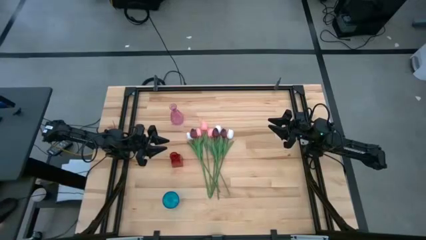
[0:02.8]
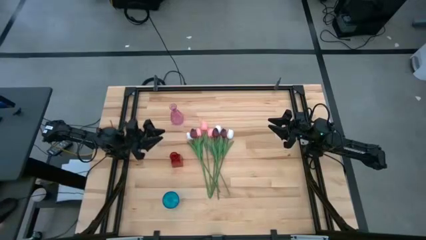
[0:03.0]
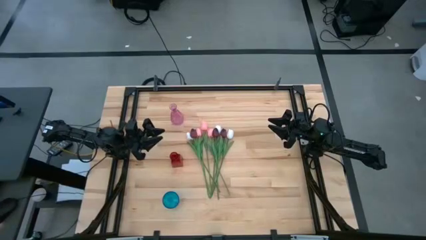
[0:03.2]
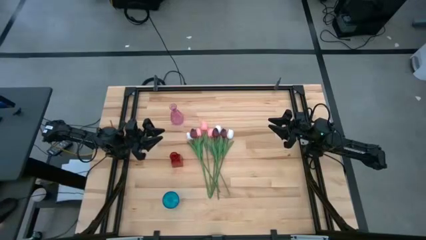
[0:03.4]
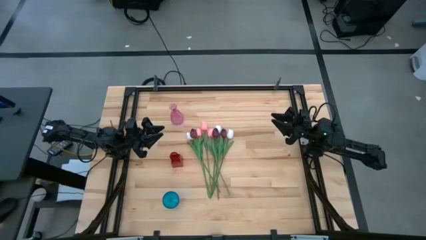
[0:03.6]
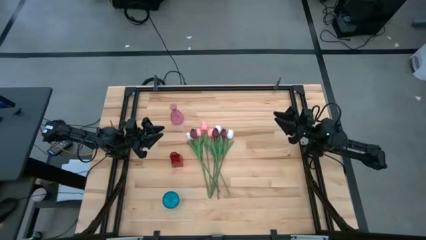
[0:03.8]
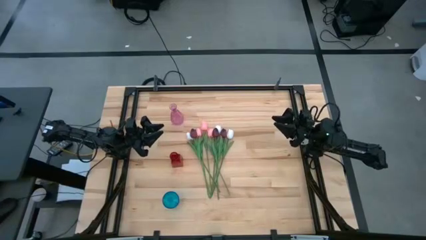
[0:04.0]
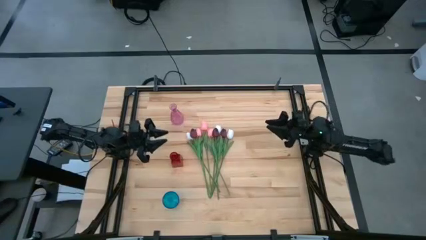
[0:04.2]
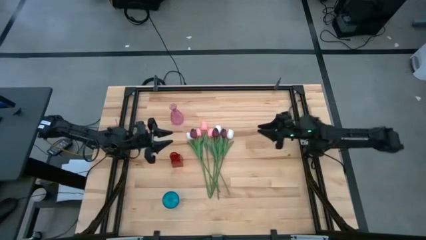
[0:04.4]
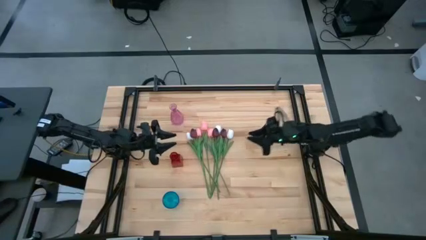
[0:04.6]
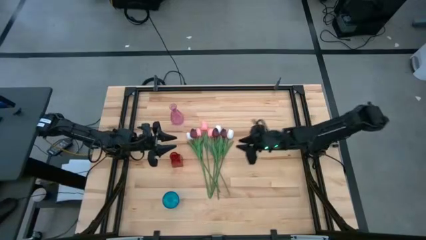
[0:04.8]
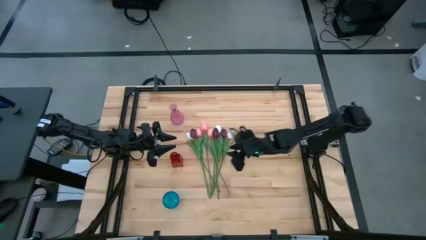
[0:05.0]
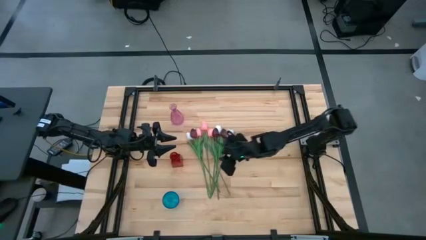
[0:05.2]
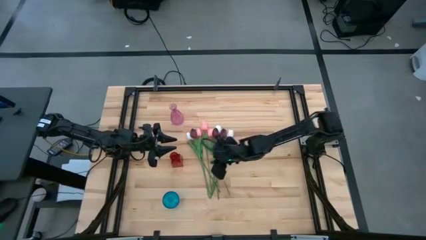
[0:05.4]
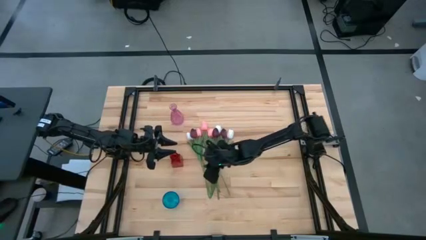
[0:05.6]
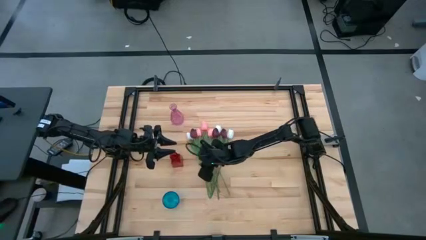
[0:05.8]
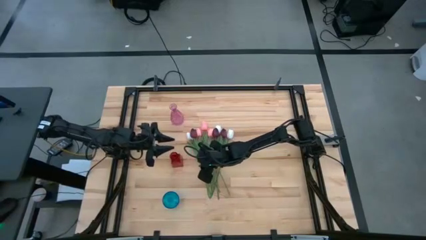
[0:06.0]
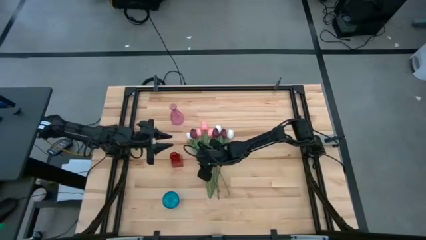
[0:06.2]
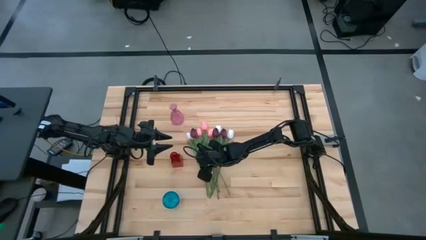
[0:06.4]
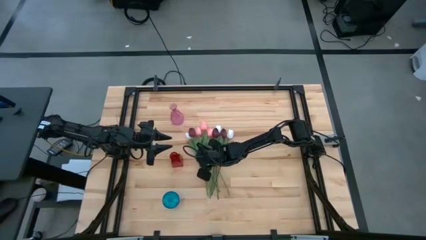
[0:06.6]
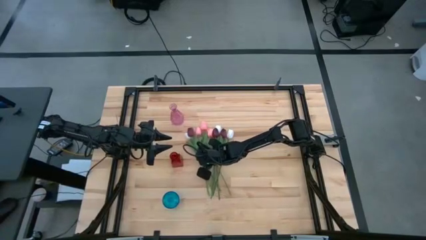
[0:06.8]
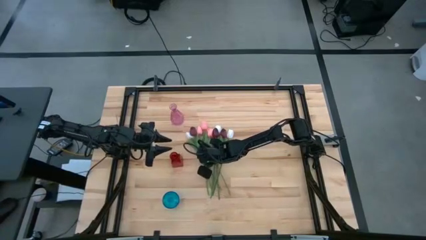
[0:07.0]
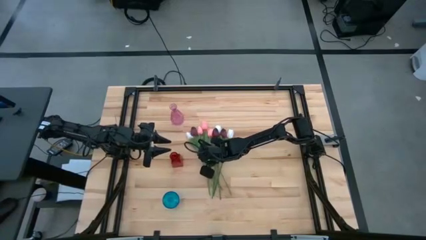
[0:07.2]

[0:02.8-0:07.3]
Task: Sort flowers into vase by color
Put the left red flower into the pink vase

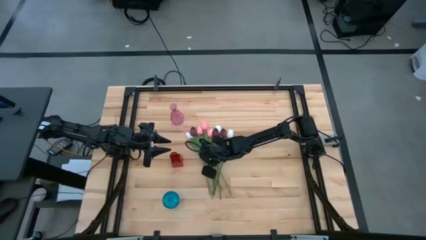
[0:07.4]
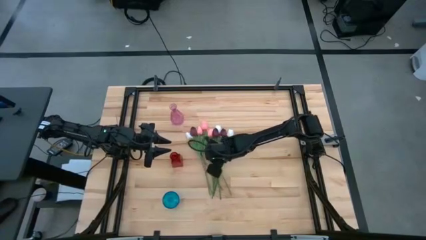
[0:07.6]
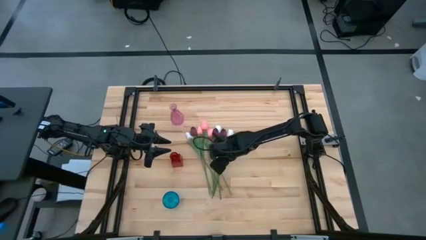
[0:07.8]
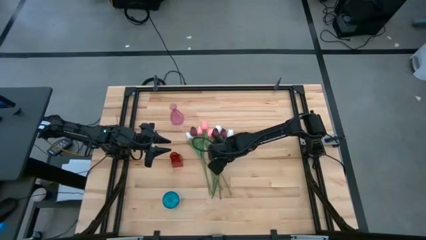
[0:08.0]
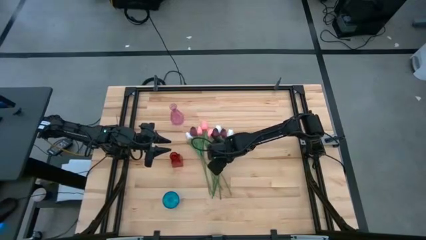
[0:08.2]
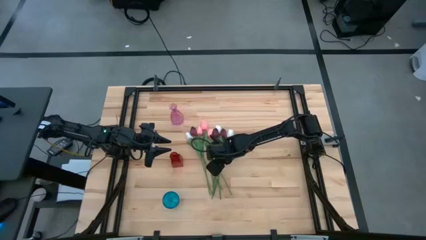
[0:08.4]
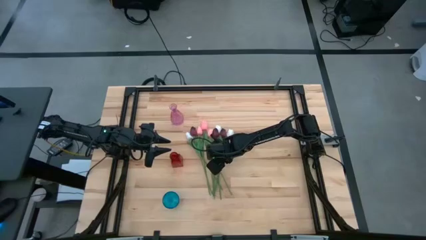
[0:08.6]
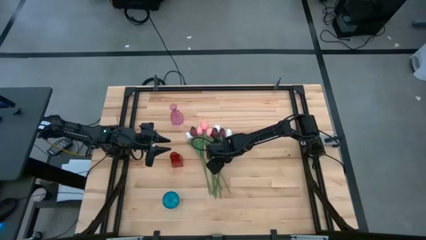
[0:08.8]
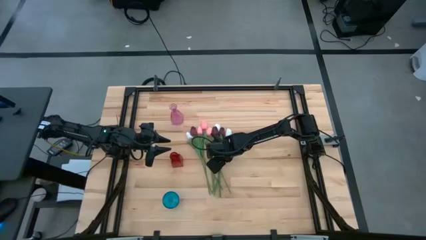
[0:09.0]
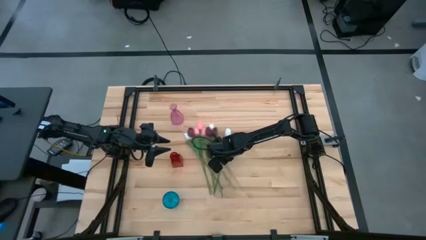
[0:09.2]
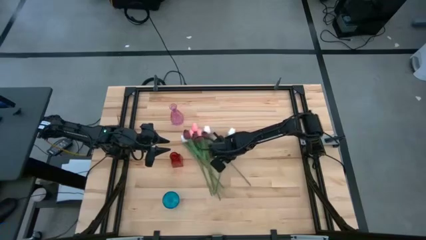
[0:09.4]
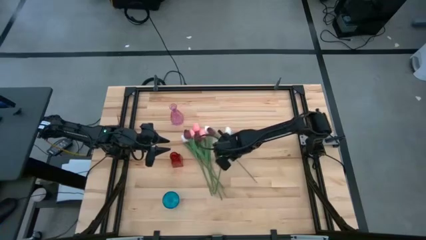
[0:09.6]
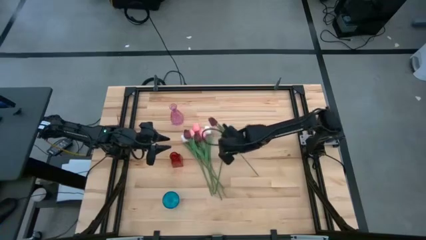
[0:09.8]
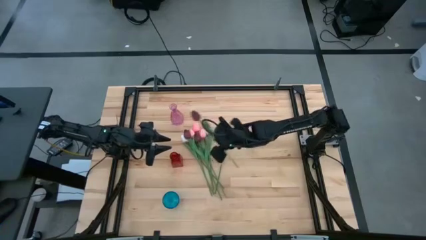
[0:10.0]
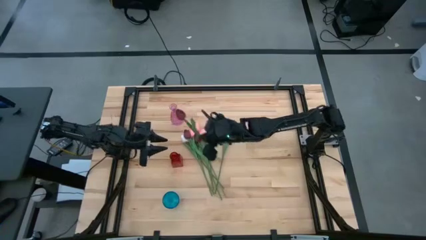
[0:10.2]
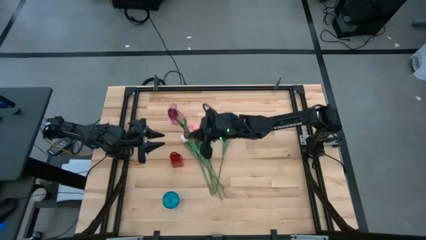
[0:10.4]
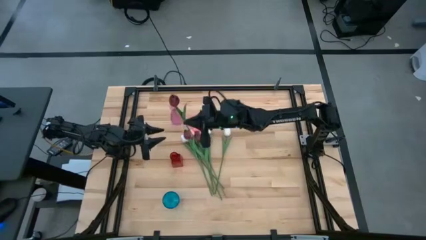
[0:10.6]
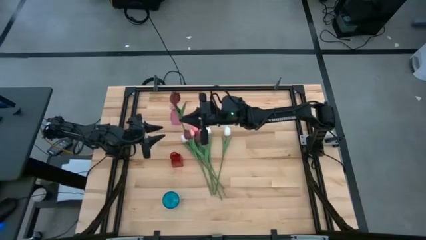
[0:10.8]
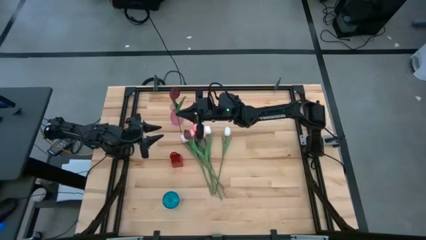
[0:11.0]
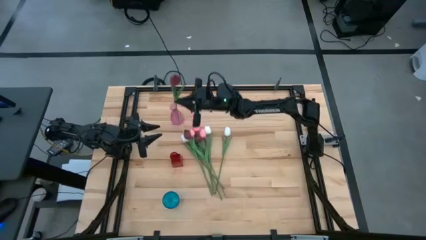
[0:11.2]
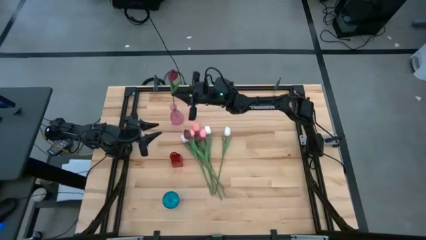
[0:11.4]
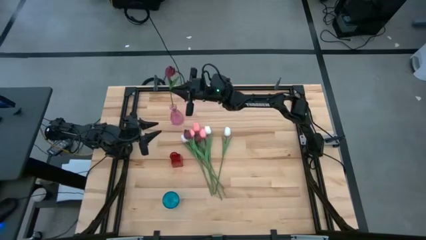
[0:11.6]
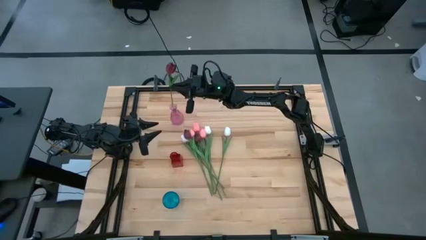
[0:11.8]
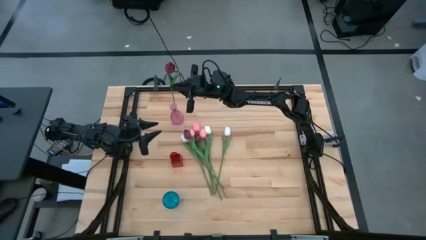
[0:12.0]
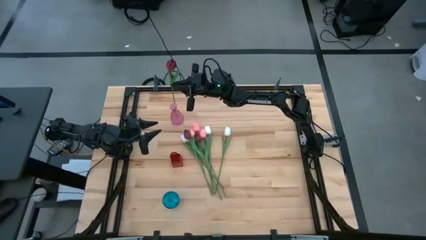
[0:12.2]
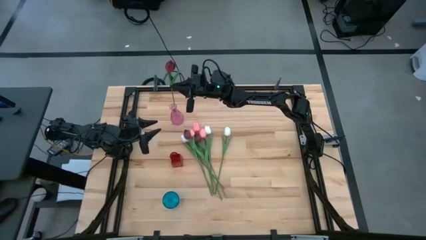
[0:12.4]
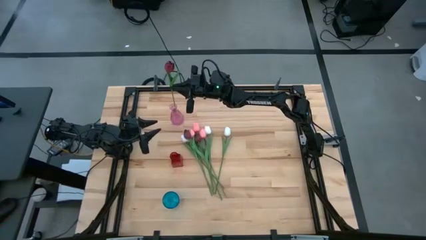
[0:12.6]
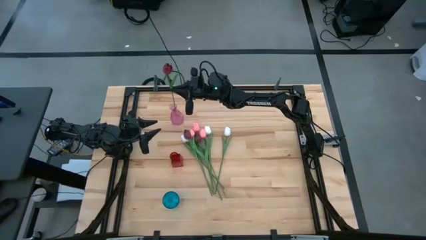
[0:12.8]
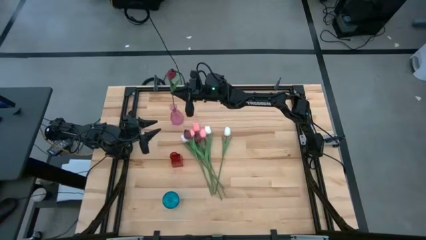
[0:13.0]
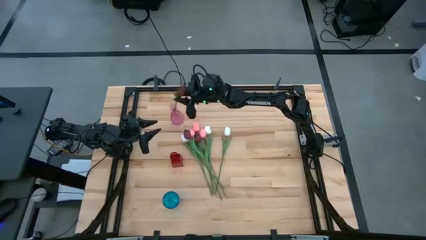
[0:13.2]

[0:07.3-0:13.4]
Put the right red flower into the pink vase

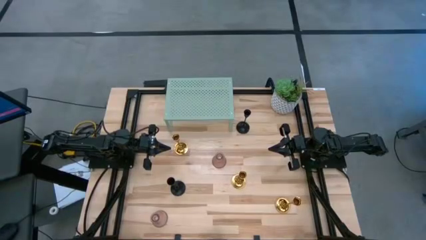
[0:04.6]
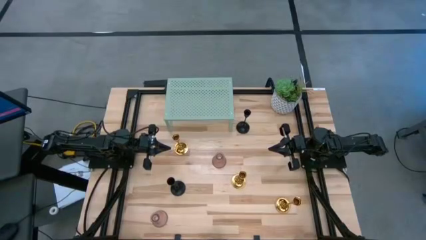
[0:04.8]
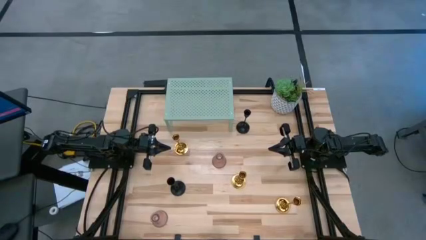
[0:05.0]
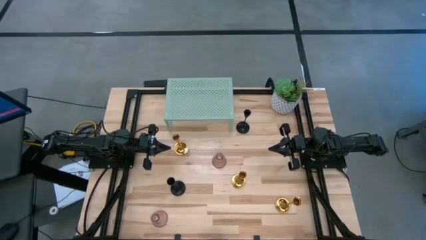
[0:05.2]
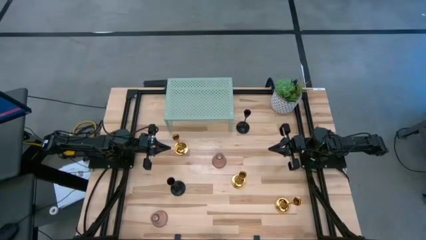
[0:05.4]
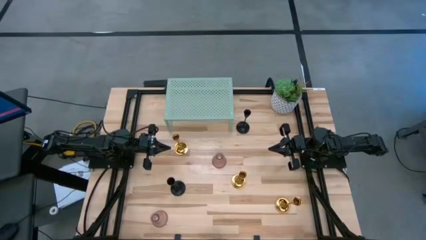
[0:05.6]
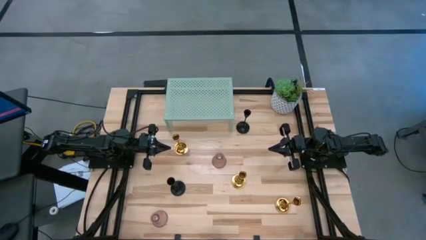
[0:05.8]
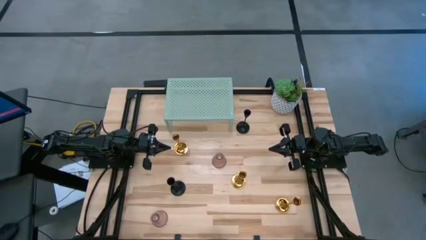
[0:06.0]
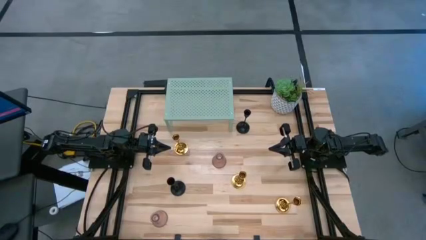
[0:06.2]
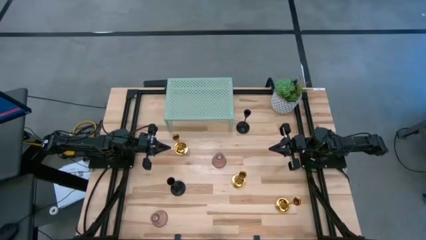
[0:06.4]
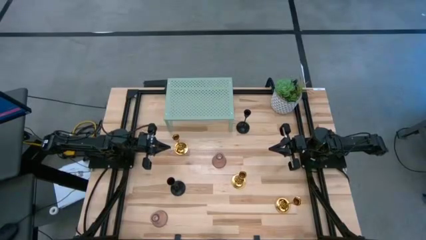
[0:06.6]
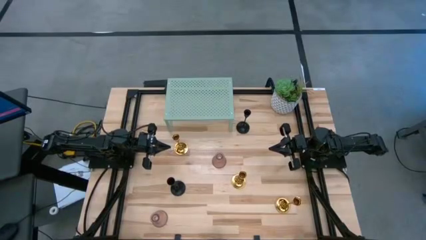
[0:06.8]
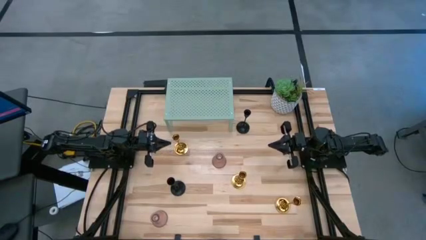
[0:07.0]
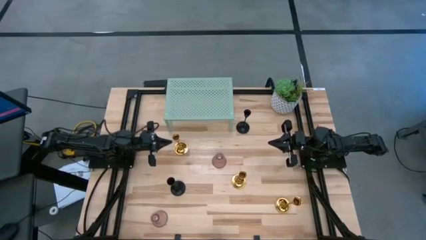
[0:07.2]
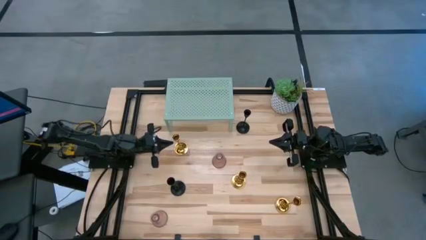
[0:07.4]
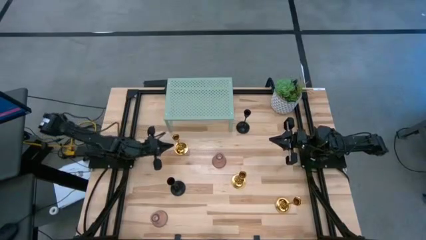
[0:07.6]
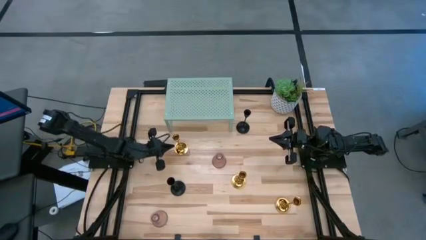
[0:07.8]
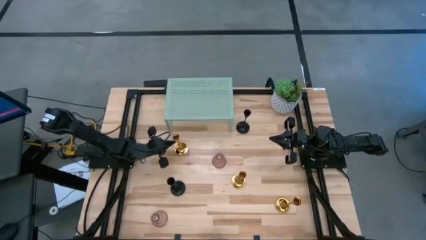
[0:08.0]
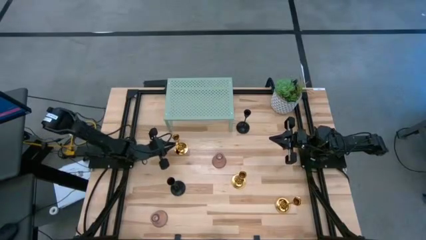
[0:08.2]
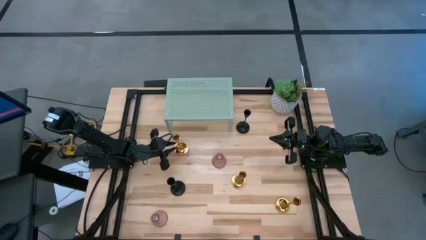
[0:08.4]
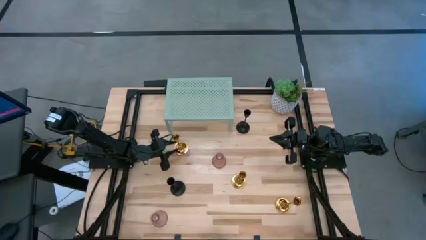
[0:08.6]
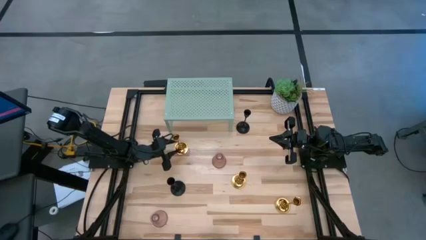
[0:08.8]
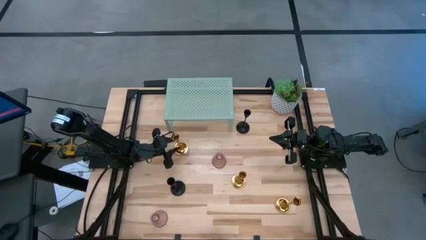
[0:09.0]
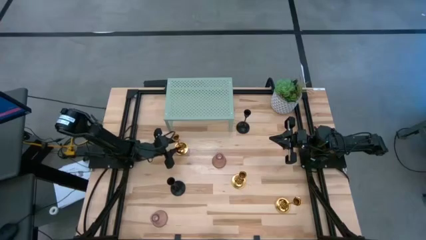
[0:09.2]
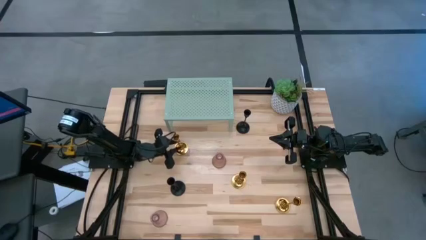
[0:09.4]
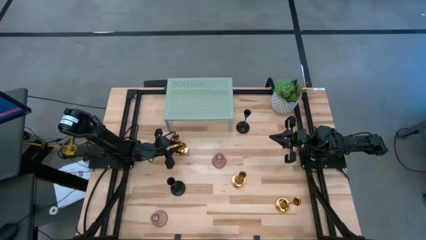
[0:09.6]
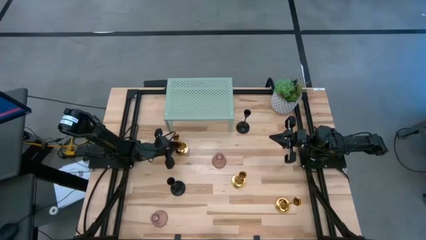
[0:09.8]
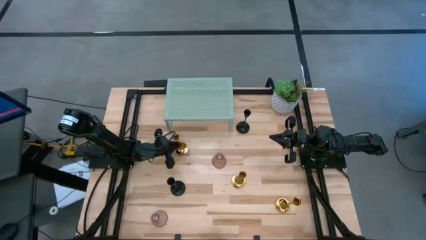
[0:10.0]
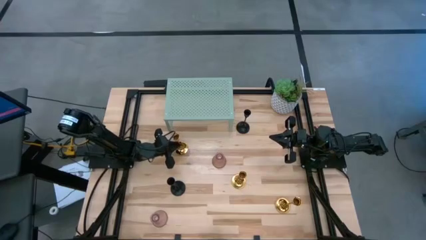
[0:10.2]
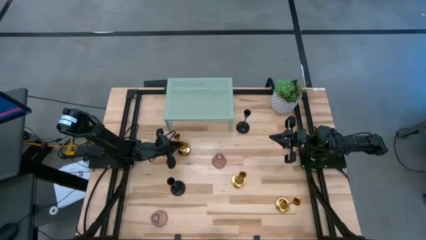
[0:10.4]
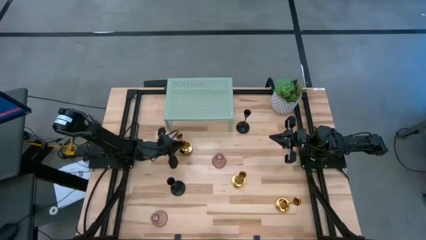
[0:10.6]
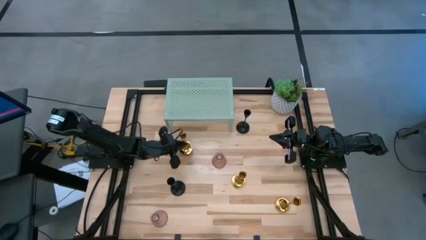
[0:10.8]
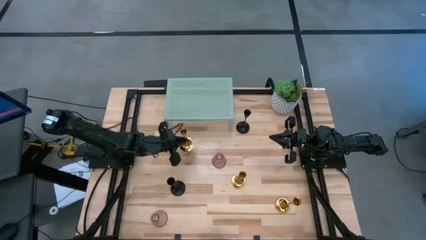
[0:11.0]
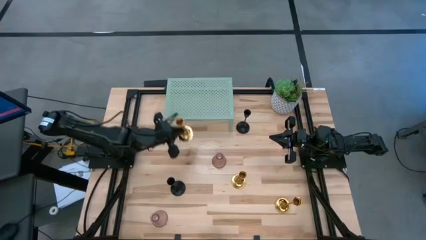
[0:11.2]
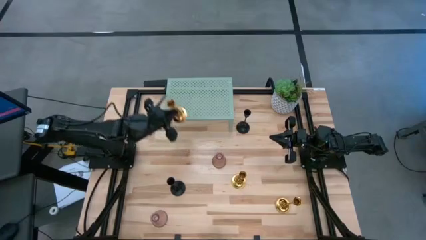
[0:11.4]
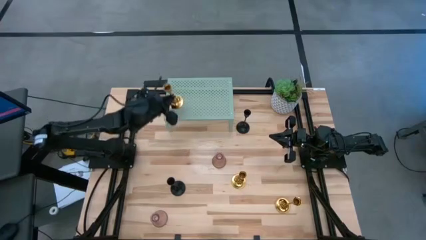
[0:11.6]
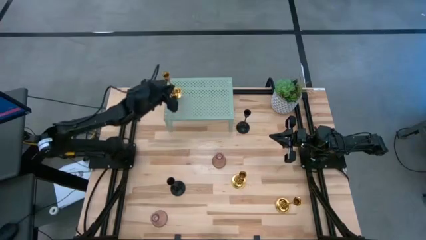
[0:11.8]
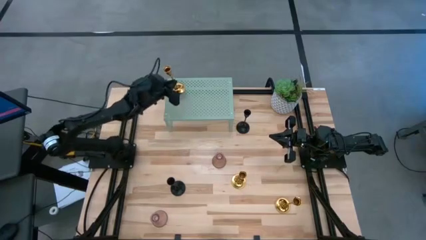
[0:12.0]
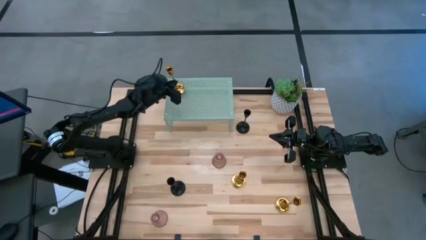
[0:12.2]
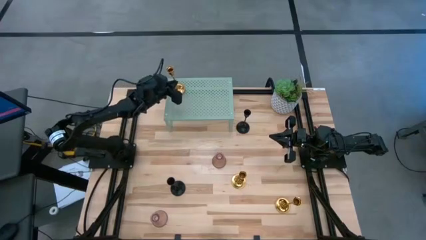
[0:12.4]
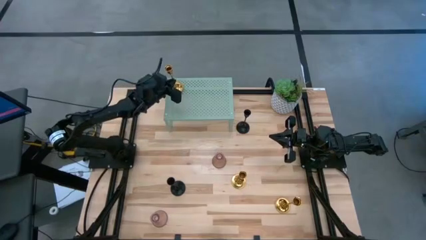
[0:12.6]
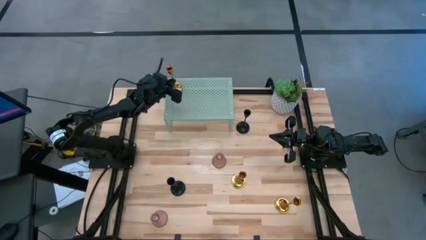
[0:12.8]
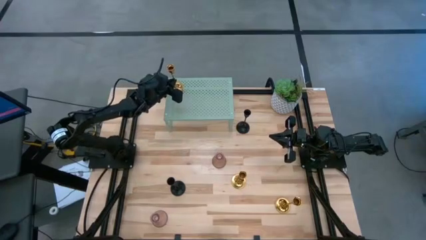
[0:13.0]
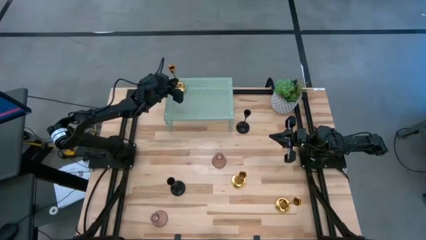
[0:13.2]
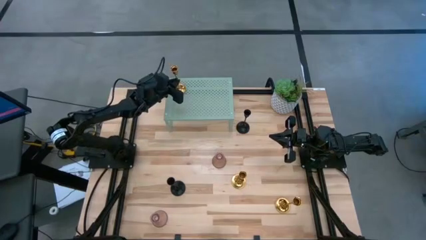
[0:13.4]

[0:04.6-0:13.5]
Task: Pick & Place candle stick holders
Put the top gold candle holder on the shelf
